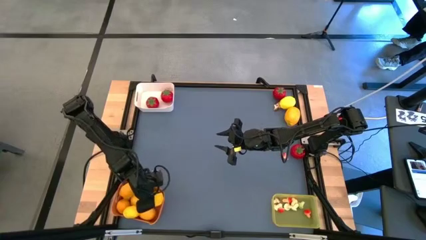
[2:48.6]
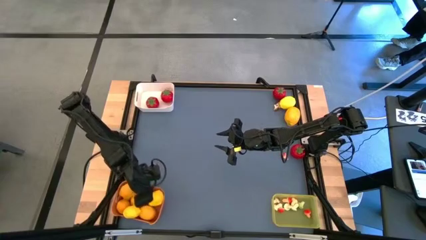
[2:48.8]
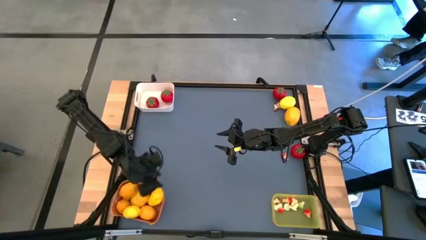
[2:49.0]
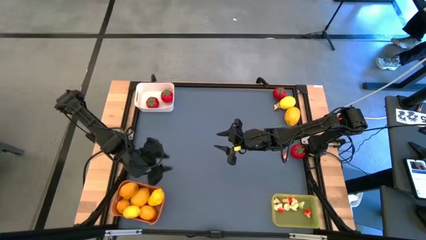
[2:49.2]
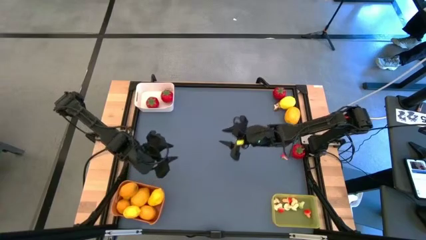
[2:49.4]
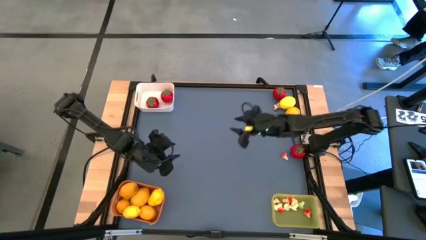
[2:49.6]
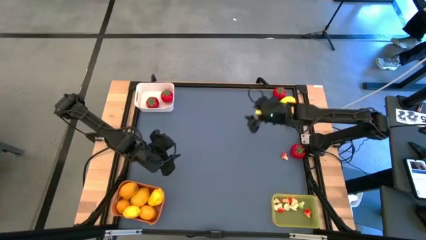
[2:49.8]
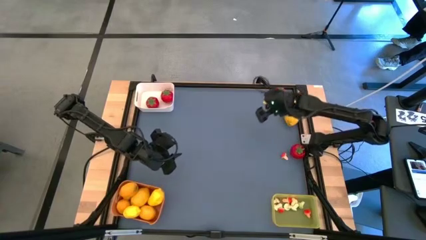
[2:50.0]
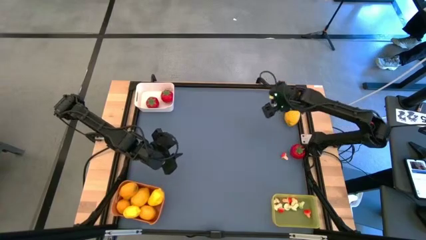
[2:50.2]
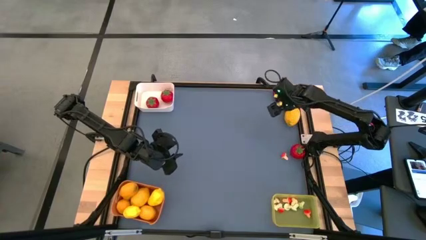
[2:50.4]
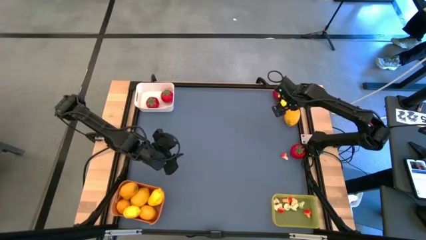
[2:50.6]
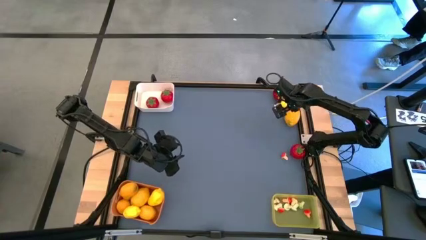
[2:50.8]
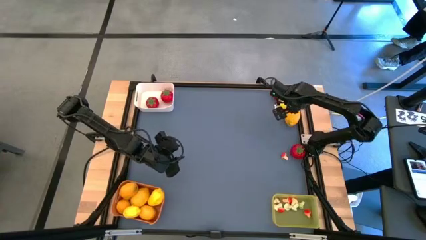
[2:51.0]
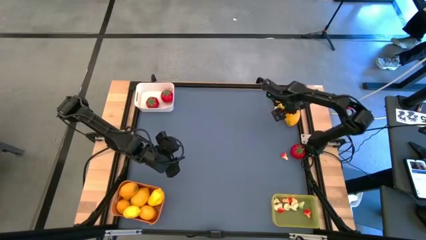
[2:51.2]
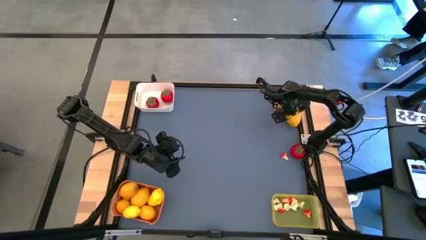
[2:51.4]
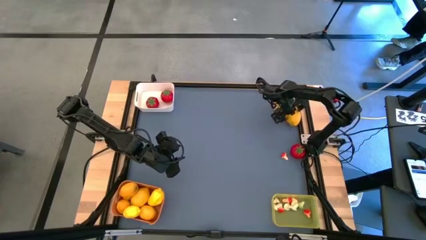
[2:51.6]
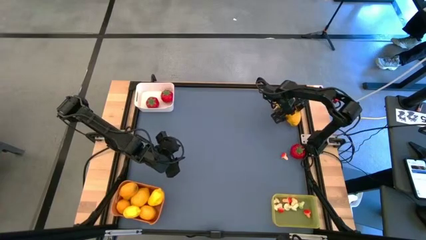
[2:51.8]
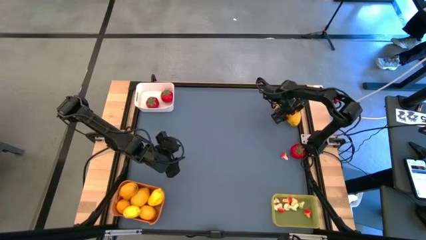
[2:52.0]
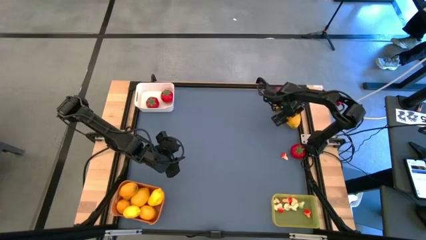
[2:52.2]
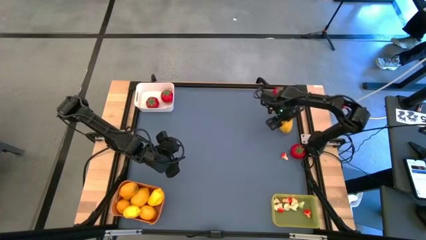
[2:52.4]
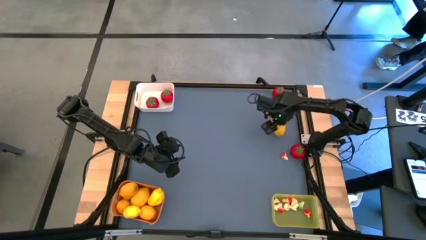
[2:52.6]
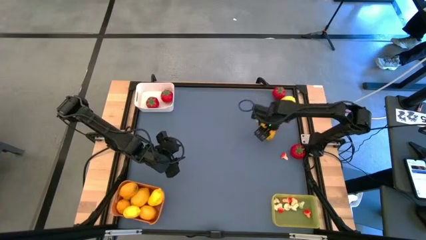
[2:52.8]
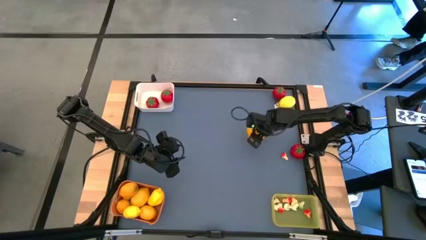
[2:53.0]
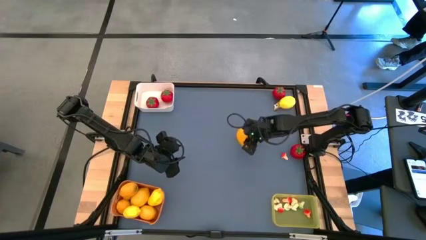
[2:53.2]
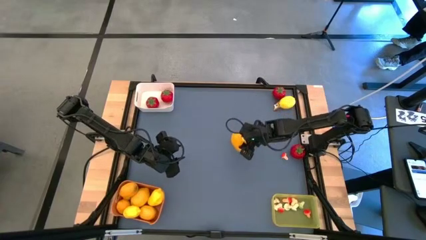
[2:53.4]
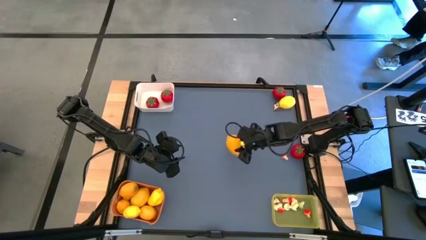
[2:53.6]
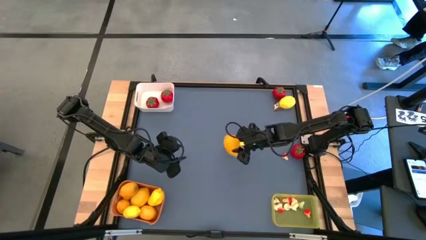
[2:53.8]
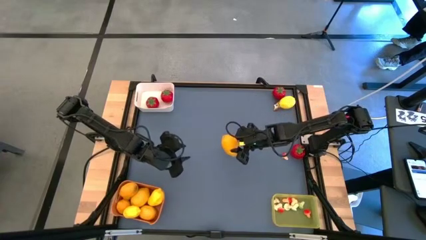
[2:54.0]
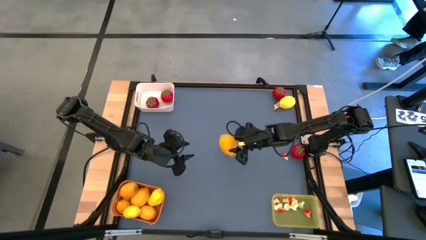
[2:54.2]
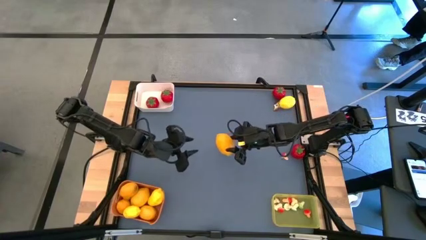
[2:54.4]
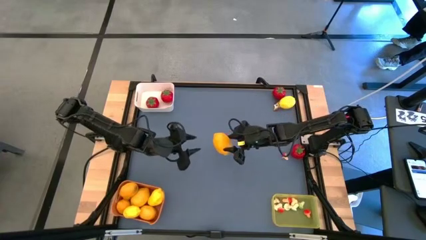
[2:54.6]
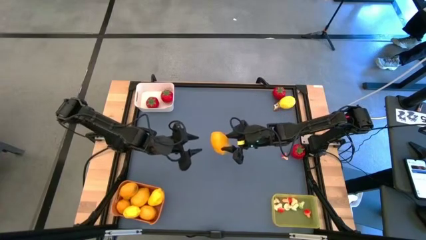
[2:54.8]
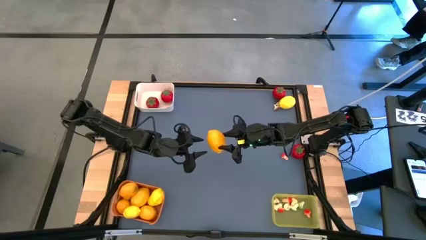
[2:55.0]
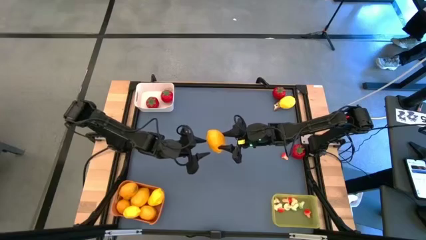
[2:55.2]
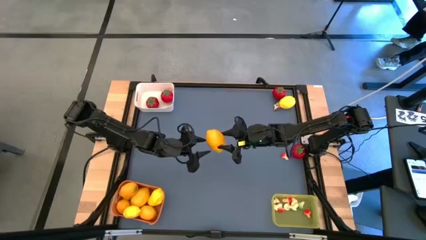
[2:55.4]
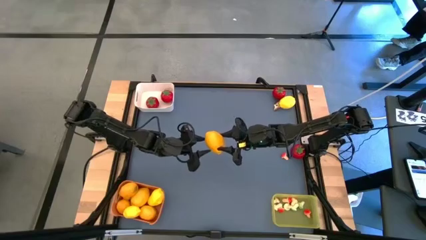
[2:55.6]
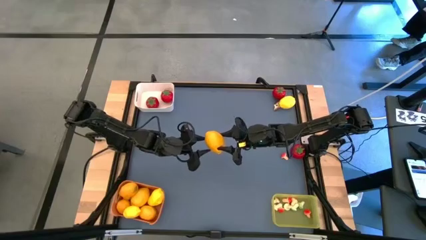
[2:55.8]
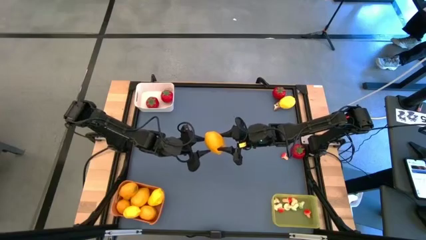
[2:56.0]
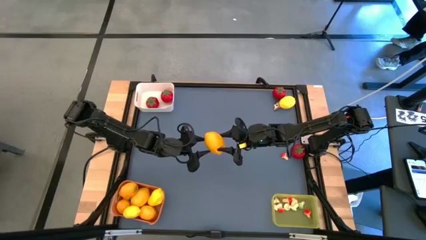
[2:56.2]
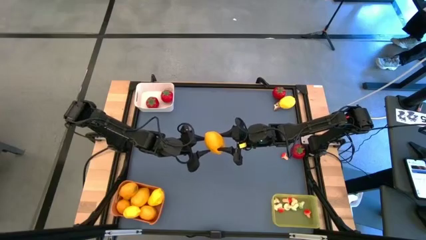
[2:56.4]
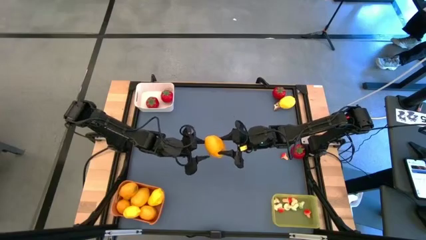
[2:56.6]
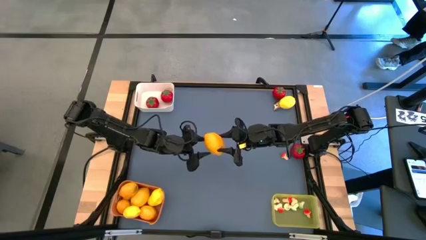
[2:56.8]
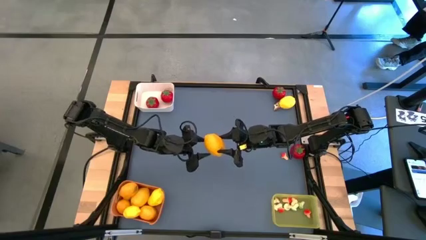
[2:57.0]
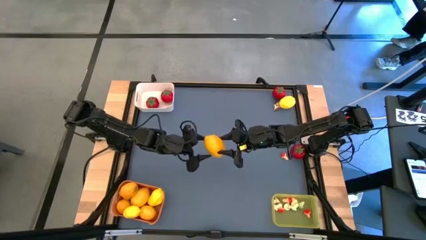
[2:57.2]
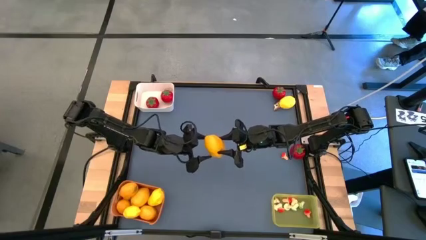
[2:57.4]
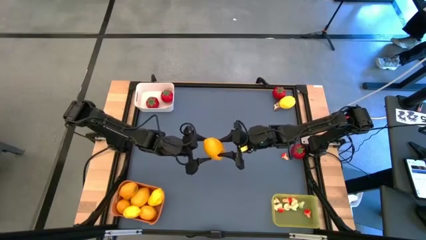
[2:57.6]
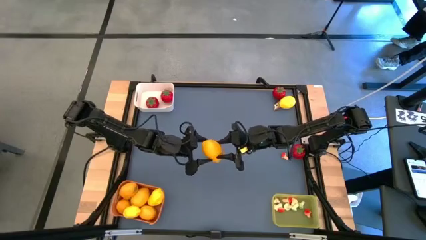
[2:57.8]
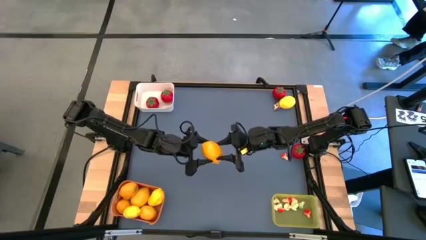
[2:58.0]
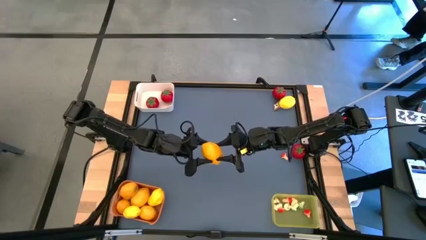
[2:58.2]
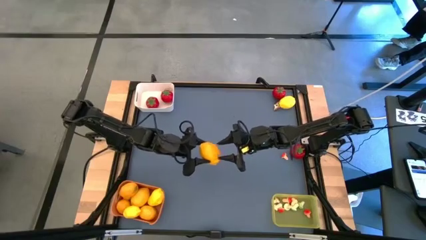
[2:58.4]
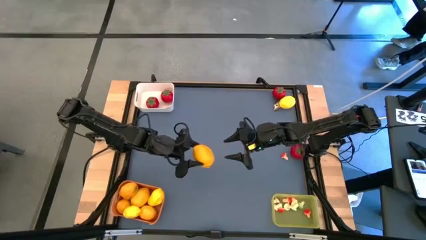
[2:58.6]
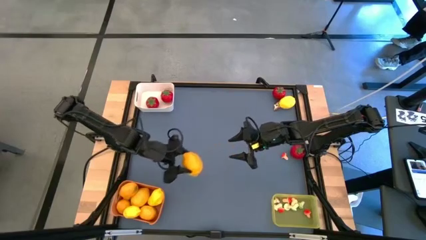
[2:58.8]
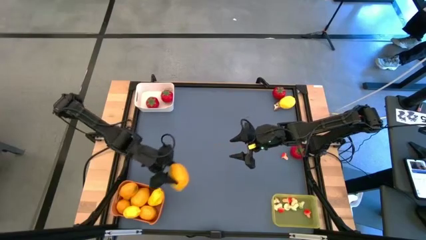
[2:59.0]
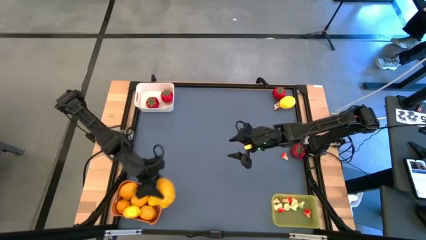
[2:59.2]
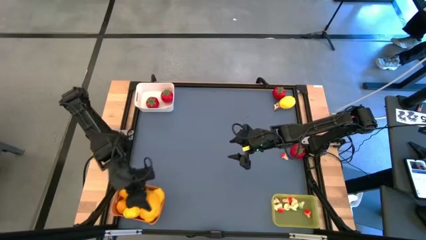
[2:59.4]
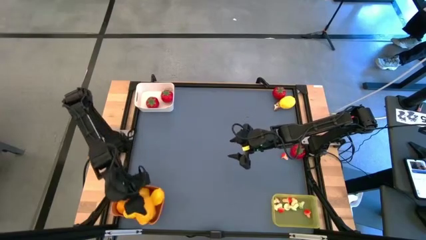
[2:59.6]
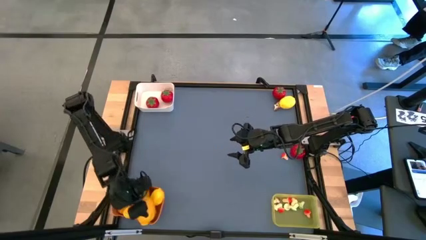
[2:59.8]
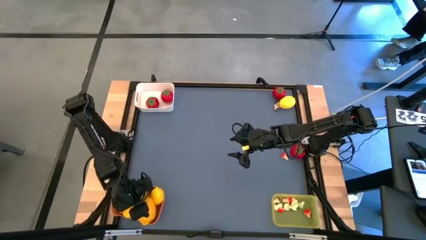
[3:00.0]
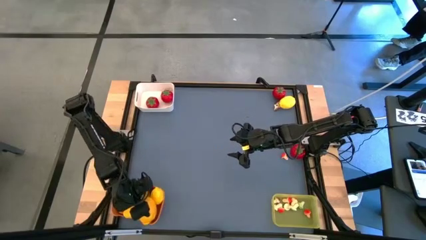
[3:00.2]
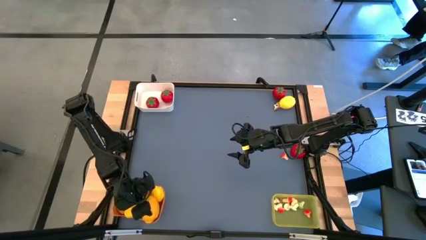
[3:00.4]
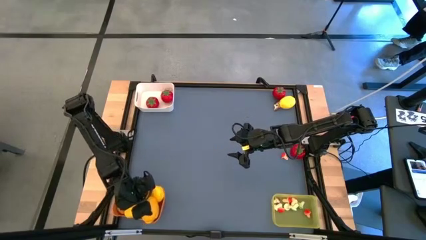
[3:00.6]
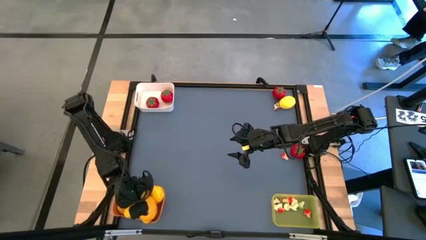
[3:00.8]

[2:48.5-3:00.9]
Task: Sort produce into baskets
Put yellow the lemon into the orange bin

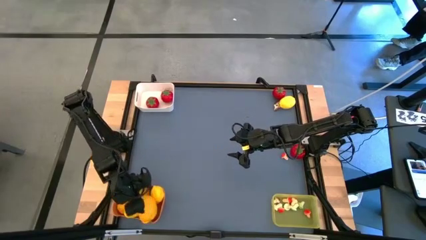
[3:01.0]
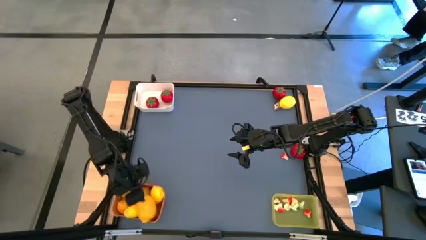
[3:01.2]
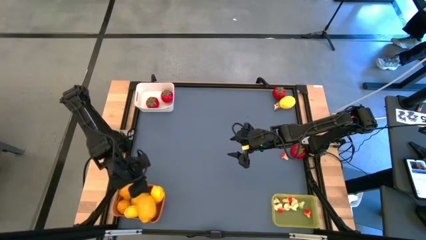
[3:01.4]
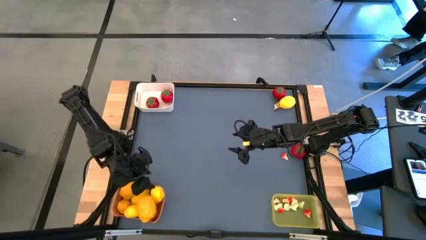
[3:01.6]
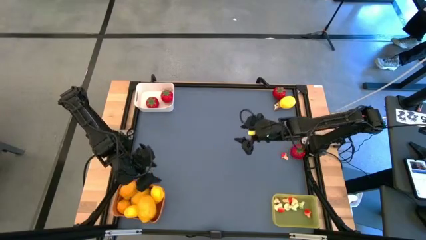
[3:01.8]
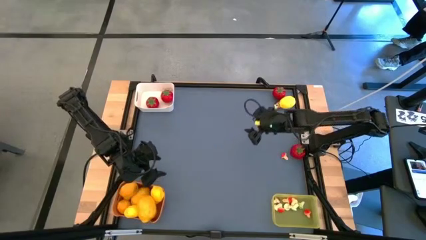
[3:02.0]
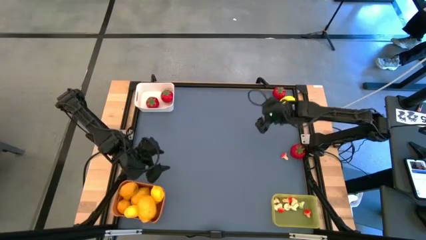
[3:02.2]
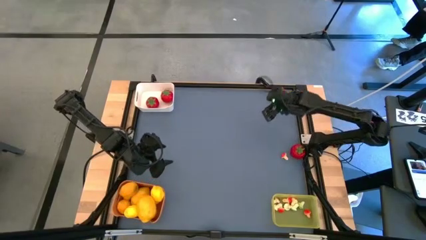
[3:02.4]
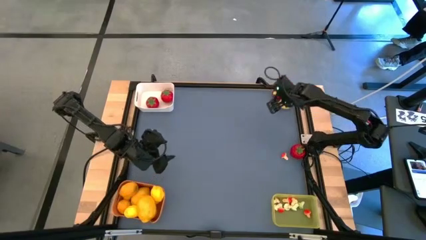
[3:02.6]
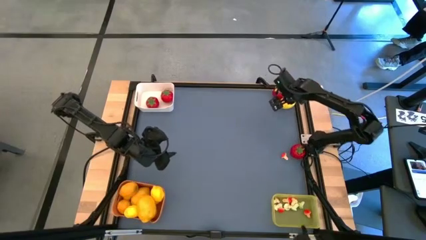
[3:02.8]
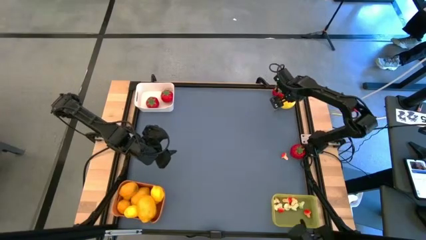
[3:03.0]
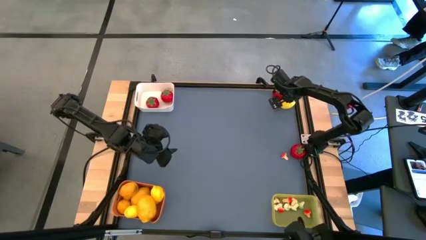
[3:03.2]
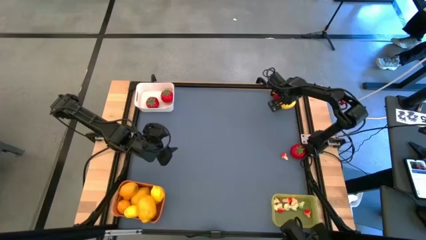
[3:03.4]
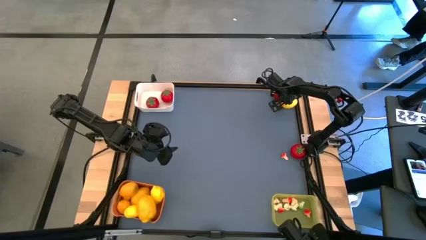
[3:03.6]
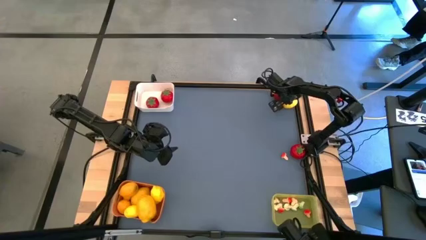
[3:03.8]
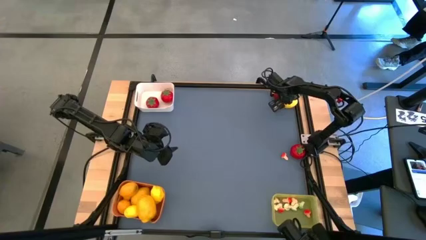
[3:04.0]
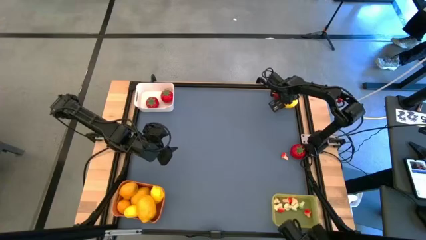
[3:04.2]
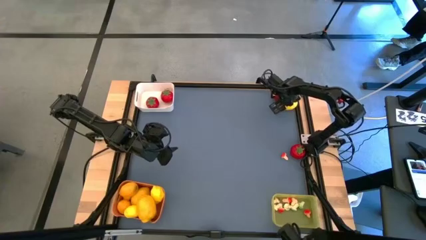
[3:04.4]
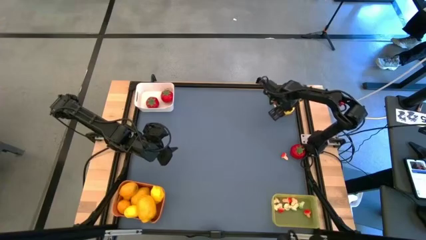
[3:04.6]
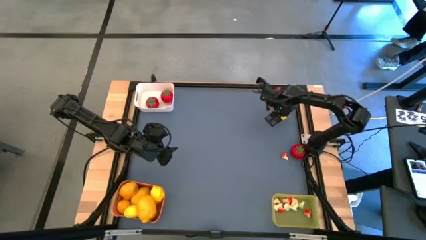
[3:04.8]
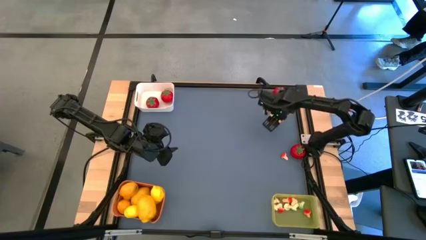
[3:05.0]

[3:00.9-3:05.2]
Put the yellow lemon into the orange bin
